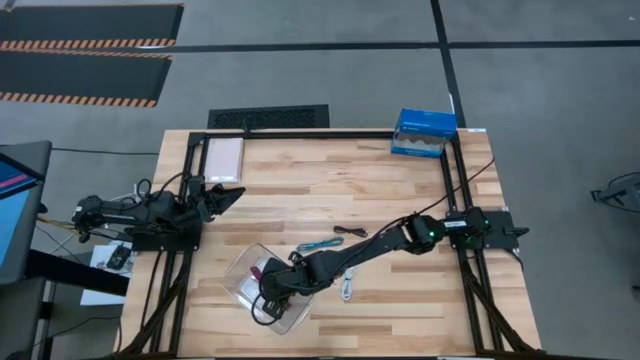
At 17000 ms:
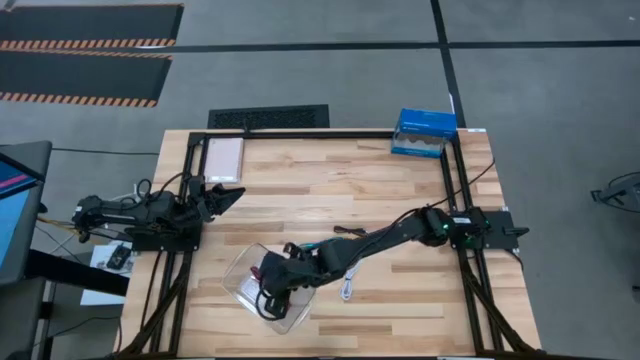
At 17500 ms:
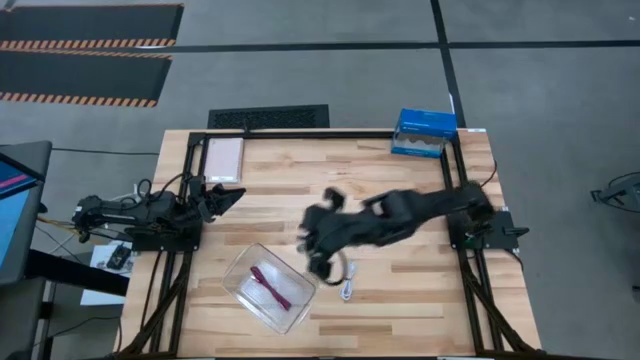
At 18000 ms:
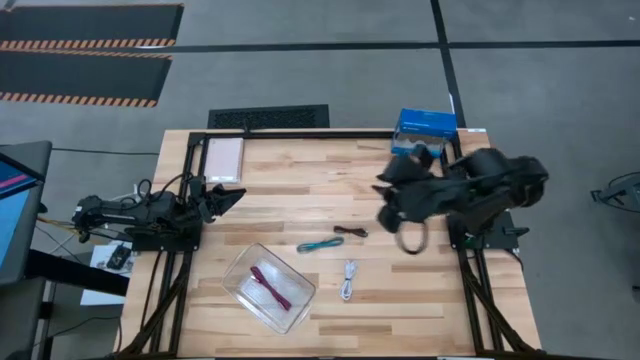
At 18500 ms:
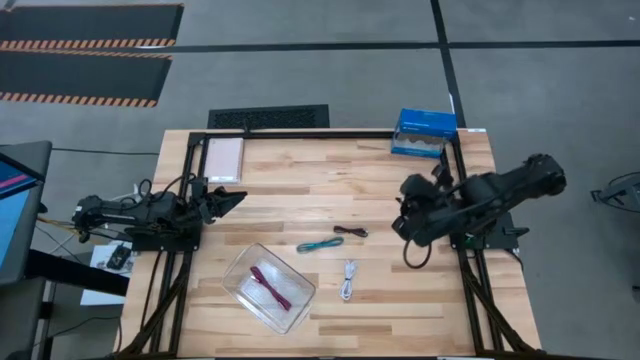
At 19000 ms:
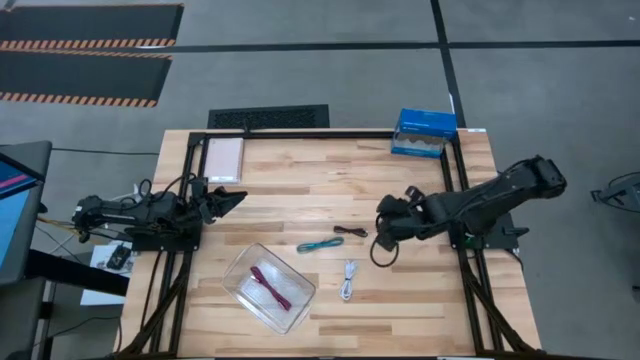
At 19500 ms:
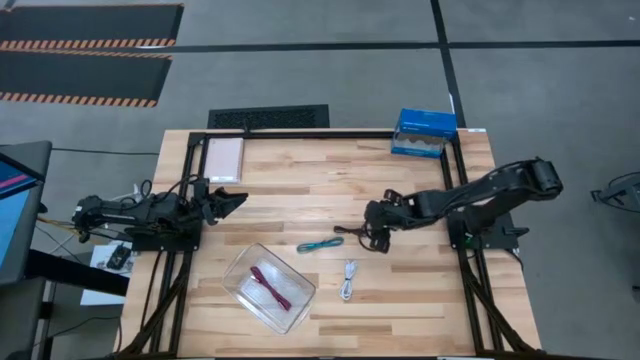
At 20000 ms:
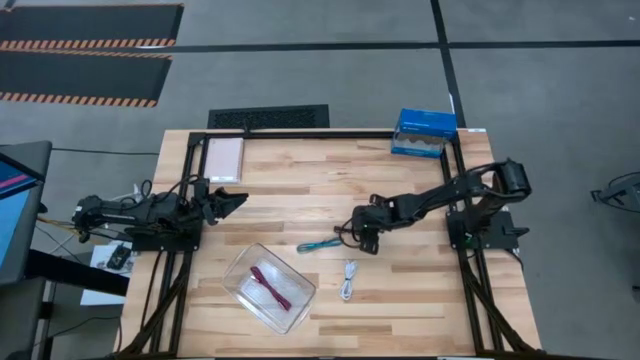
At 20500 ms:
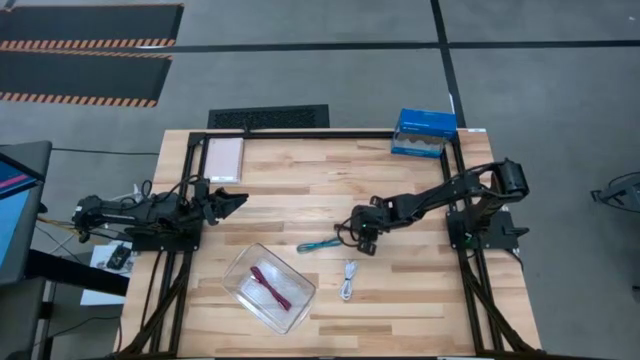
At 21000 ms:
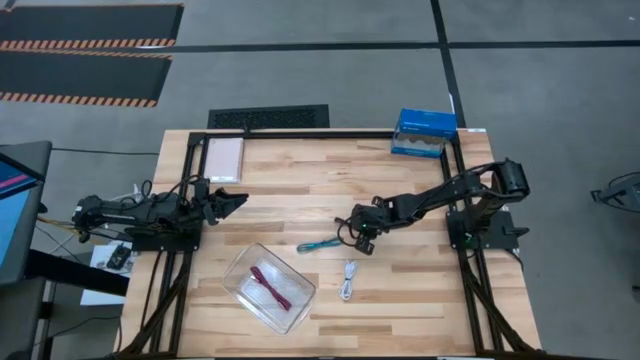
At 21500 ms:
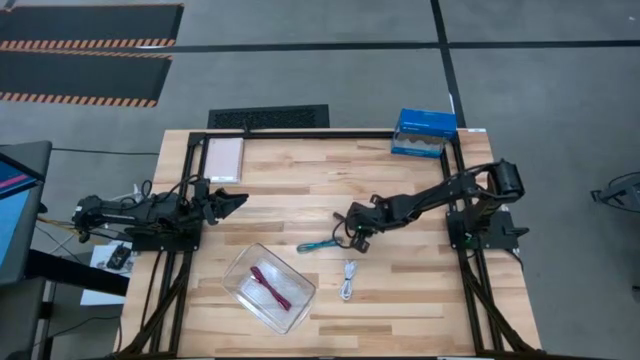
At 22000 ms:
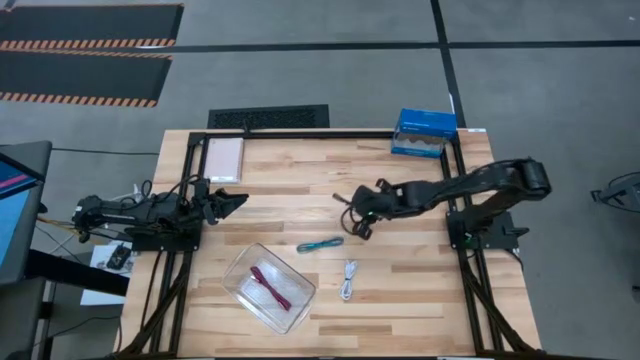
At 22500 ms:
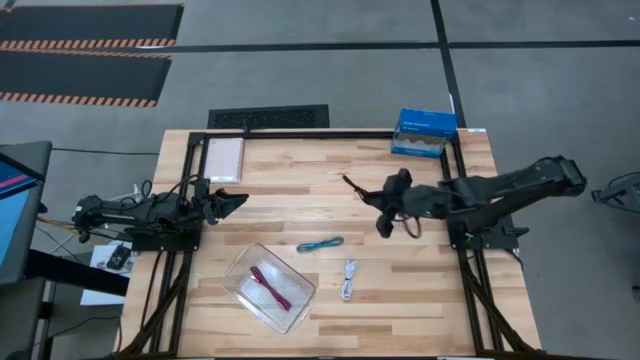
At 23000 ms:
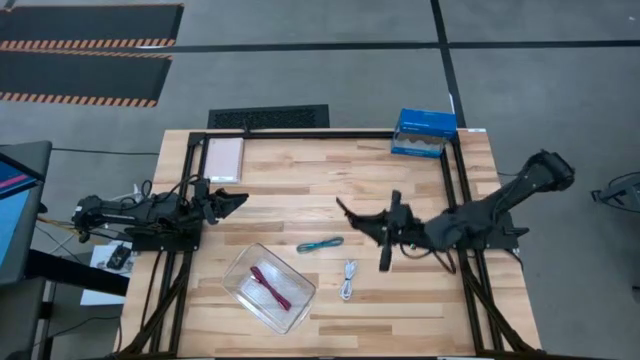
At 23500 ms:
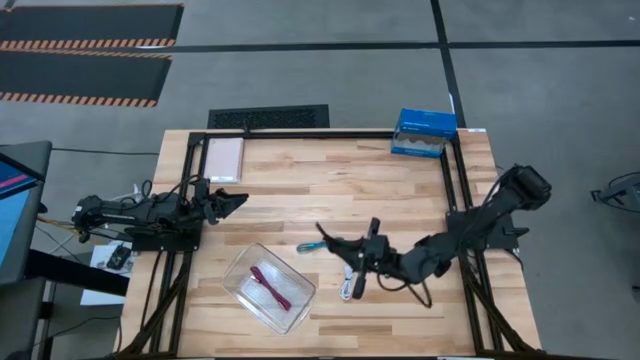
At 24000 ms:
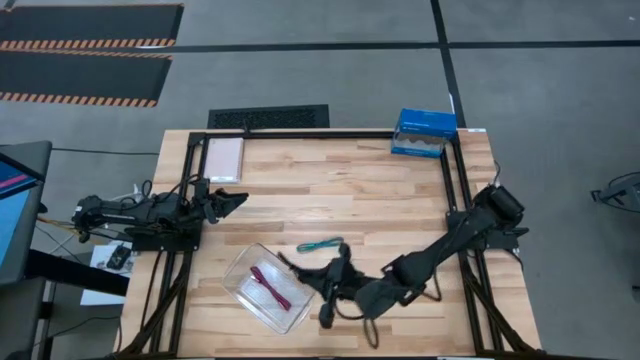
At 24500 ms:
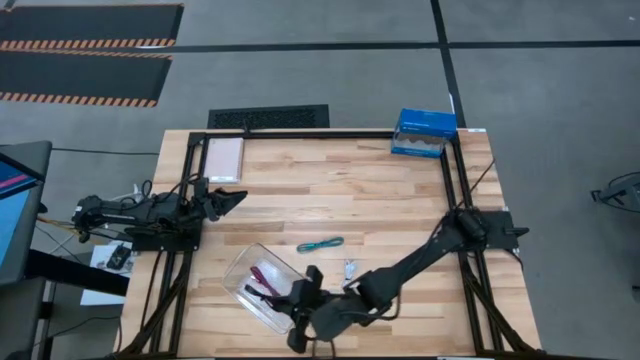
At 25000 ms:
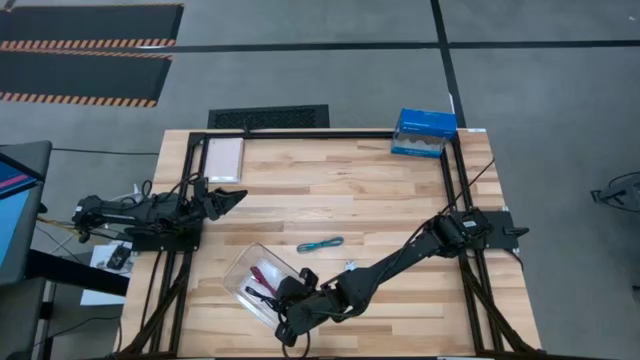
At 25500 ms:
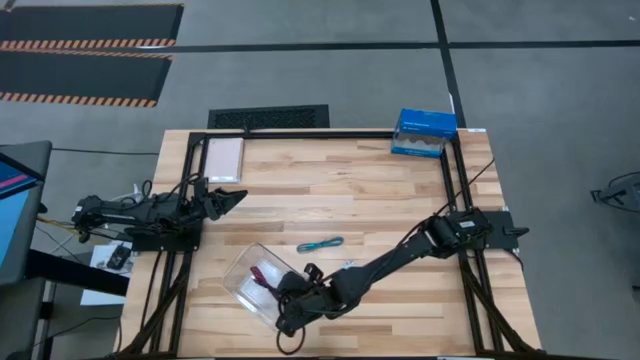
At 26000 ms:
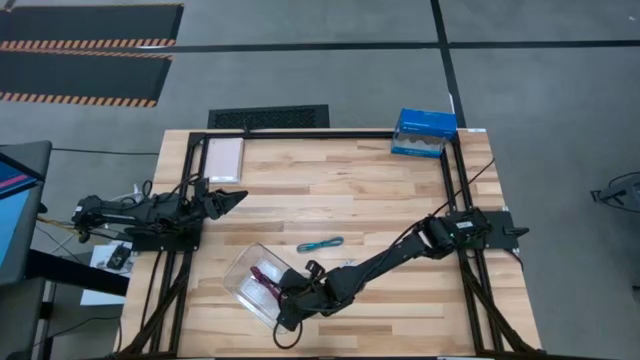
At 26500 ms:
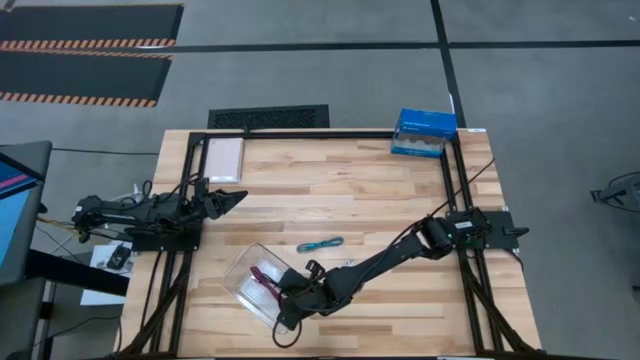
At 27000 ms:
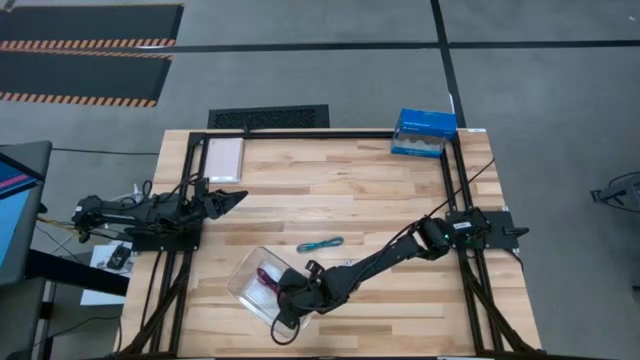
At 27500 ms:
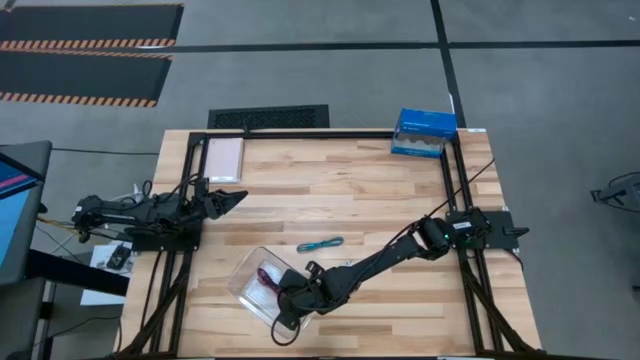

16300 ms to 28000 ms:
Task: Pick and place USB-C Cables
Put the black charger cable into the transparent bin

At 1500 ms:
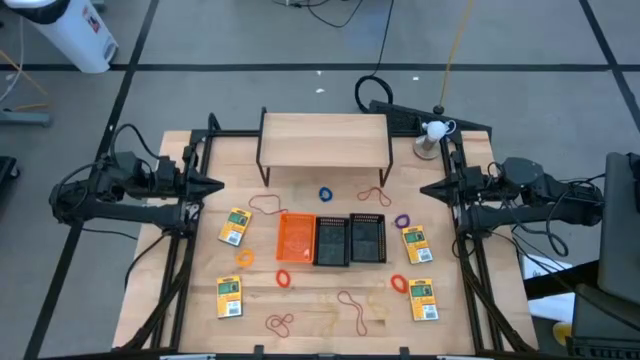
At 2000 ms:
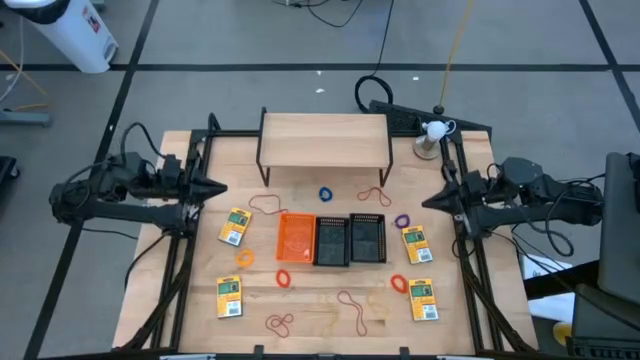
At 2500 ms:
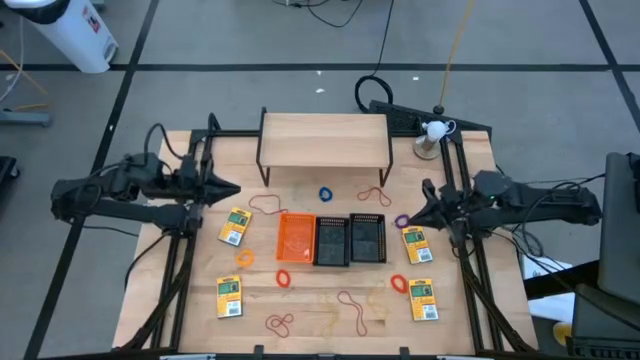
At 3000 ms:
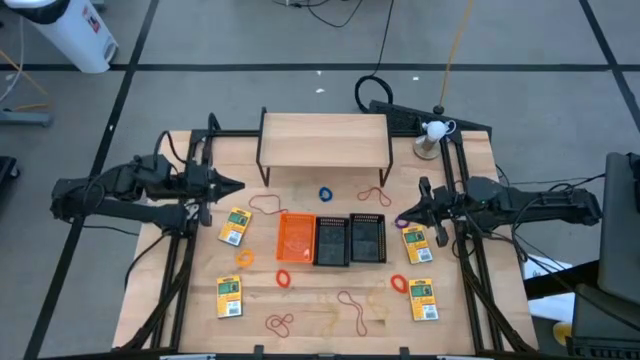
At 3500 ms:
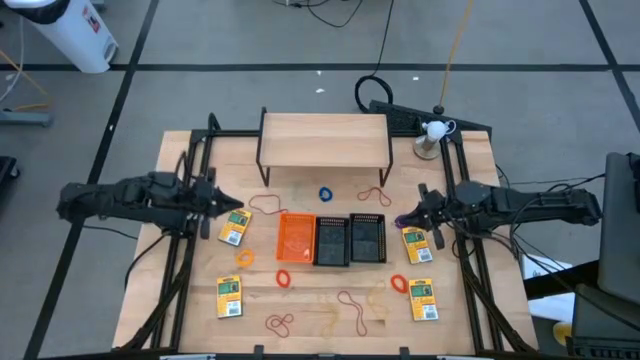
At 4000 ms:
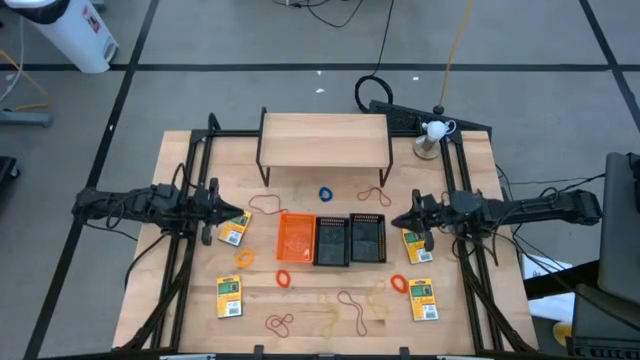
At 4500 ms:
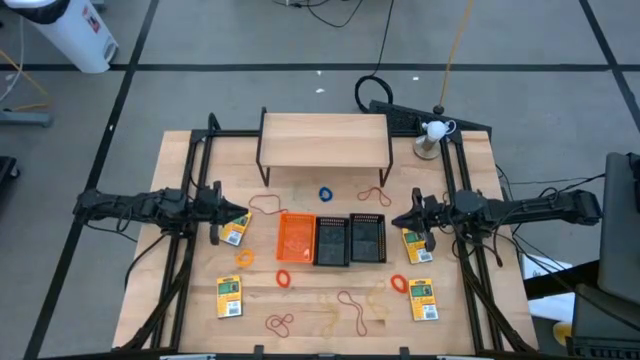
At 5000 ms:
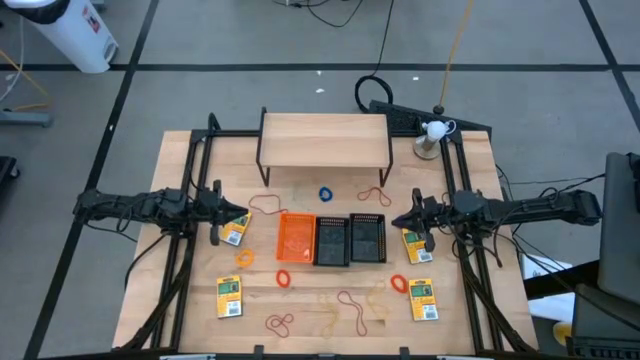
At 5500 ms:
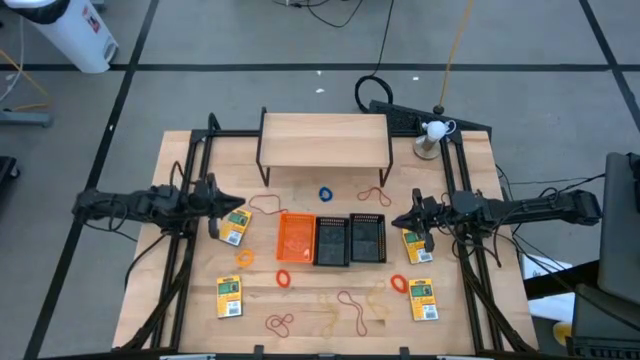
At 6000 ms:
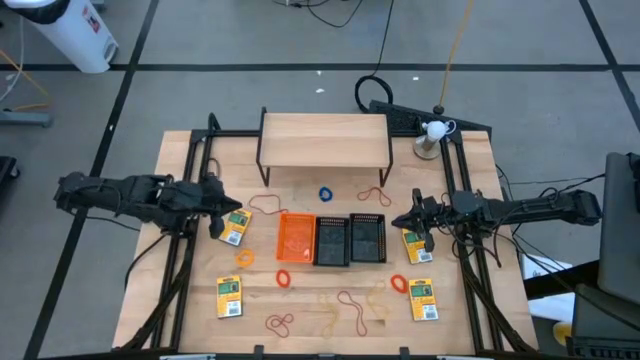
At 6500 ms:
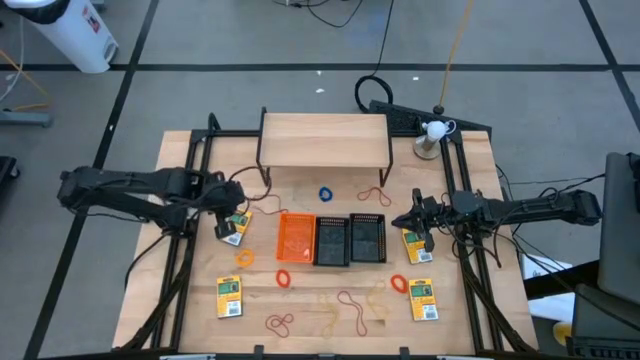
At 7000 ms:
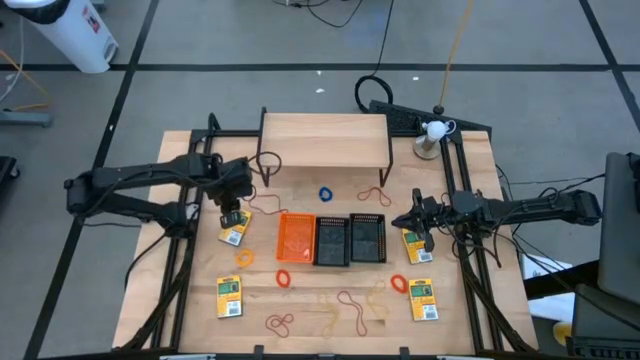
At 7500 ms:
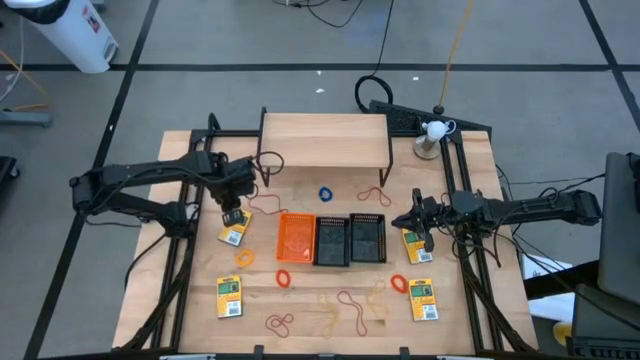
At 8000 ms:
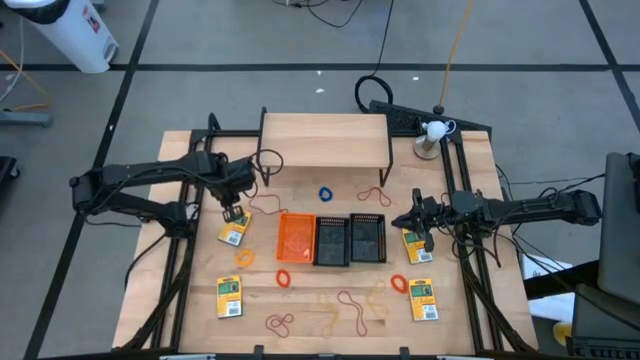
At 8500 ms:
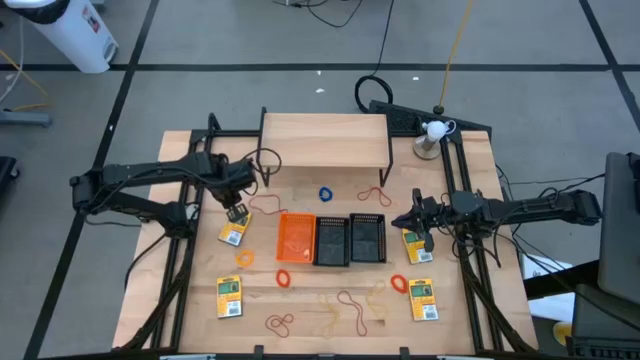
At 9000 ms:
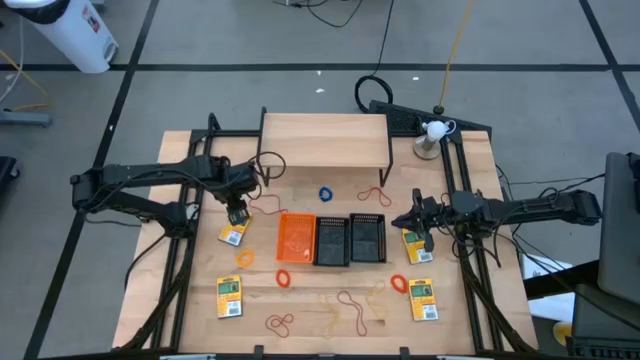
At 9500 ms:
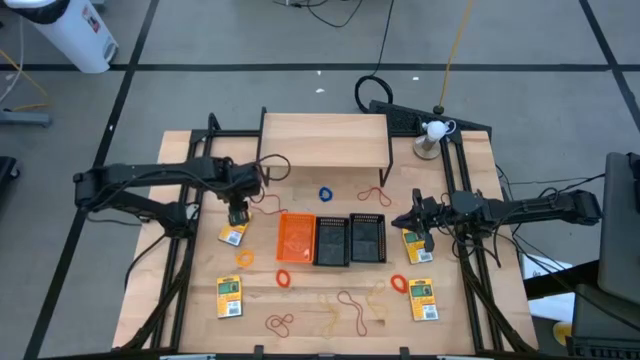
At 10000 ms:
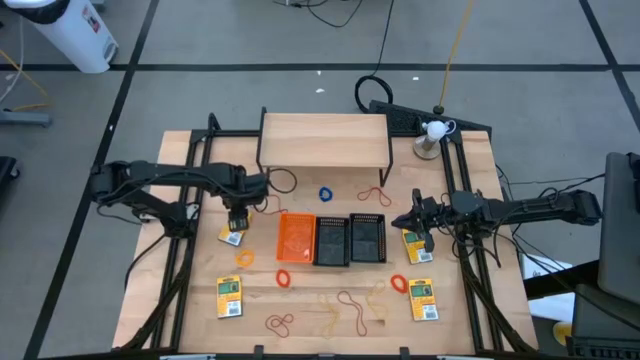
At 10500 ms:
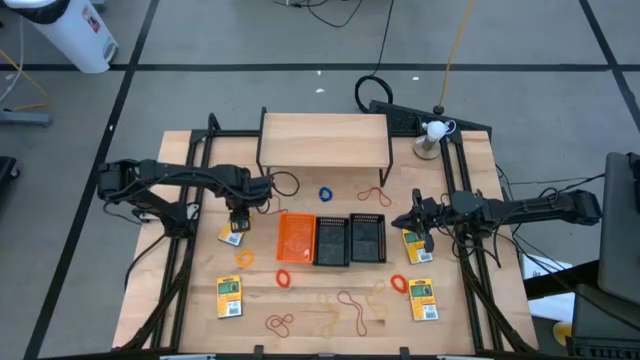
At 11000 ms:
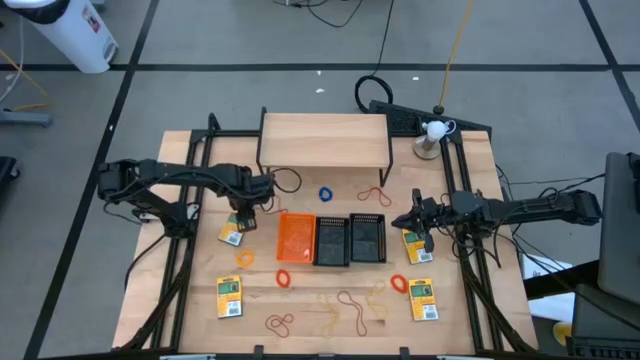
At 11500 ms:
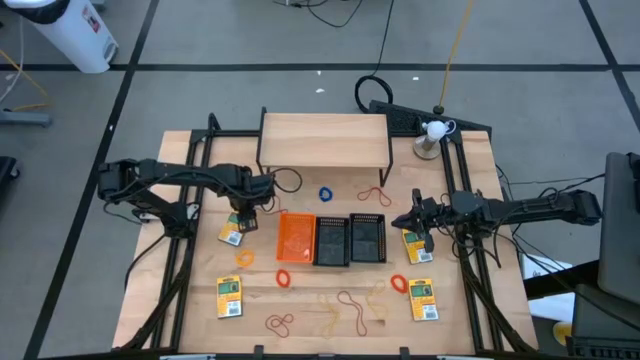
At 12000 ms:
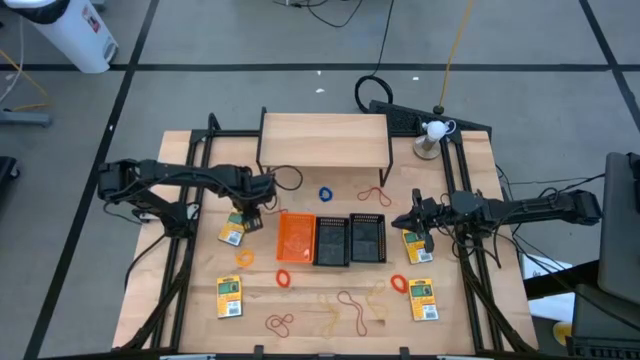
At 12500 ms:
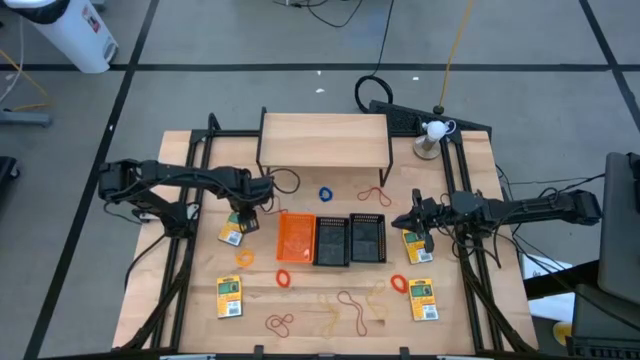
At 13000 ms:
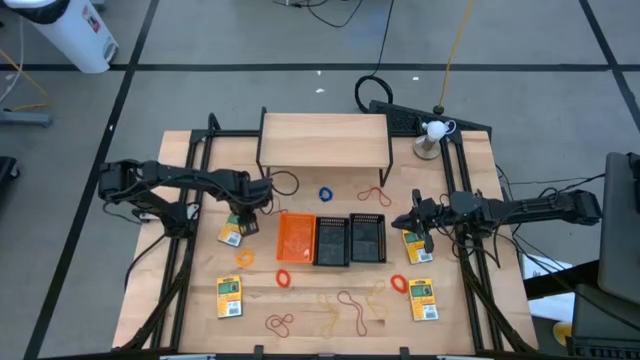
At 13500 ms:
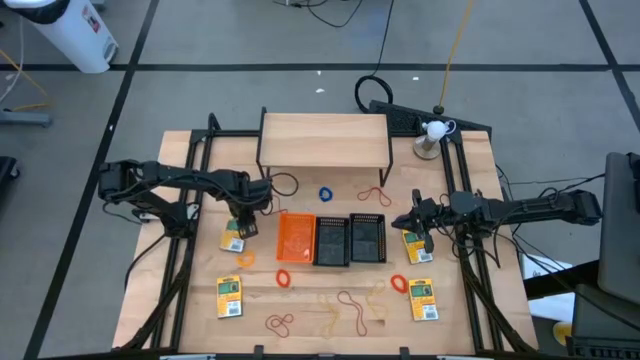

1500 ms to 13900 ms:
Task: Pick & Place Office Desk Supplies
Put the crayons box into the orange bin
